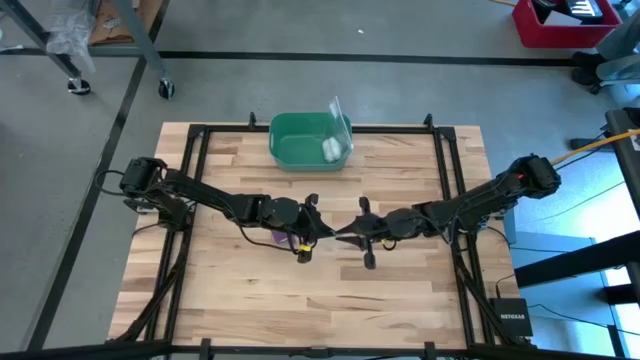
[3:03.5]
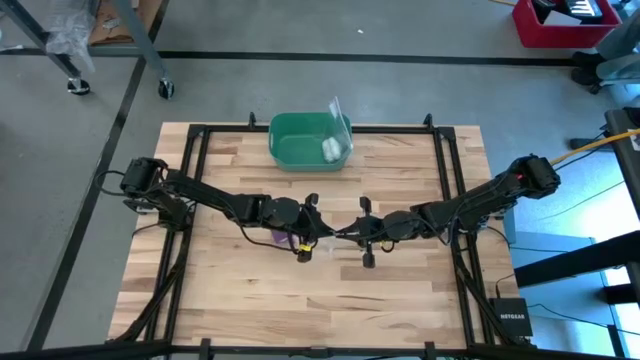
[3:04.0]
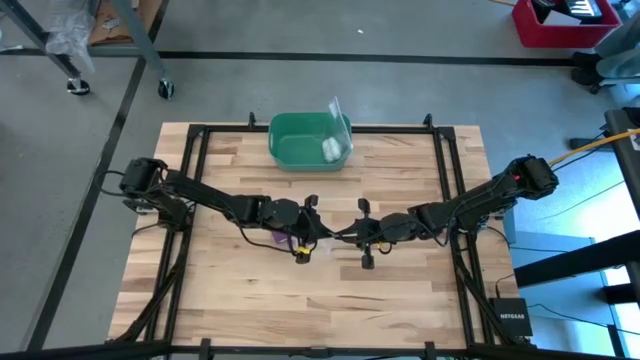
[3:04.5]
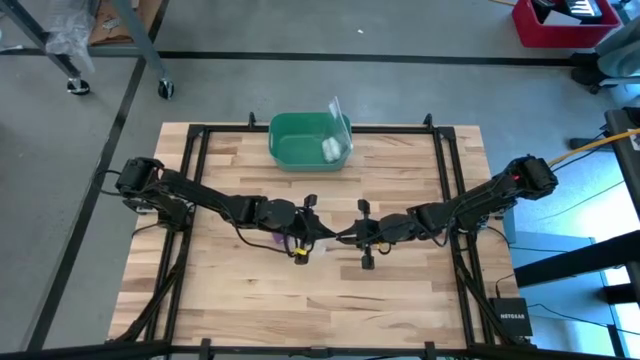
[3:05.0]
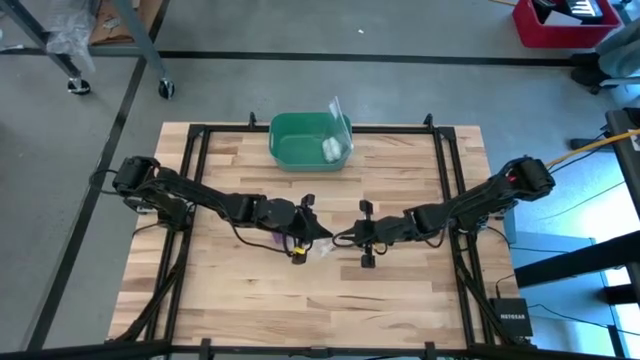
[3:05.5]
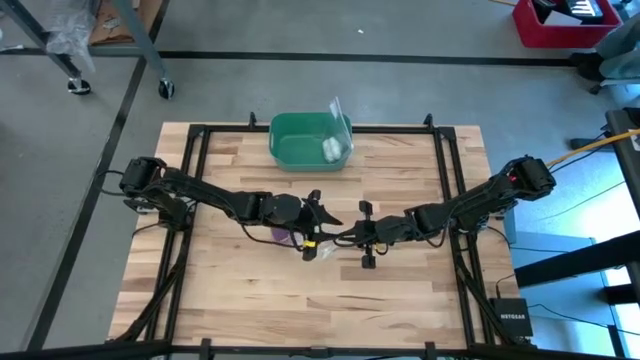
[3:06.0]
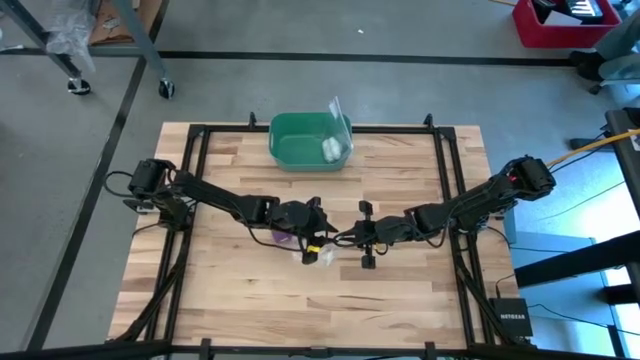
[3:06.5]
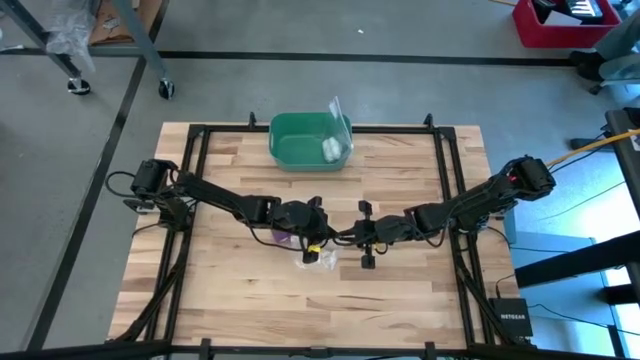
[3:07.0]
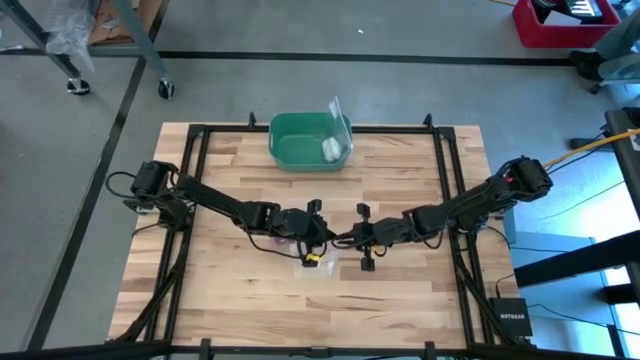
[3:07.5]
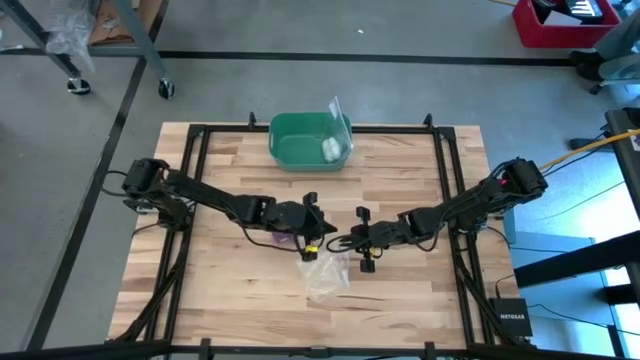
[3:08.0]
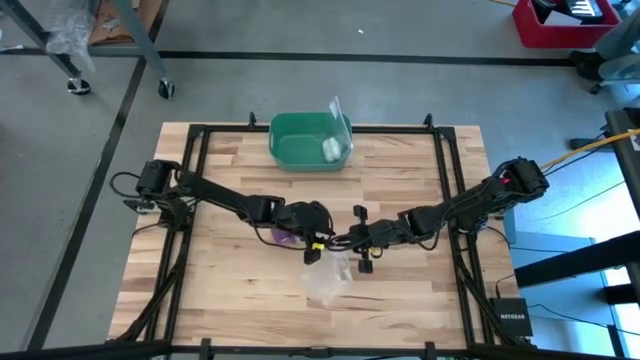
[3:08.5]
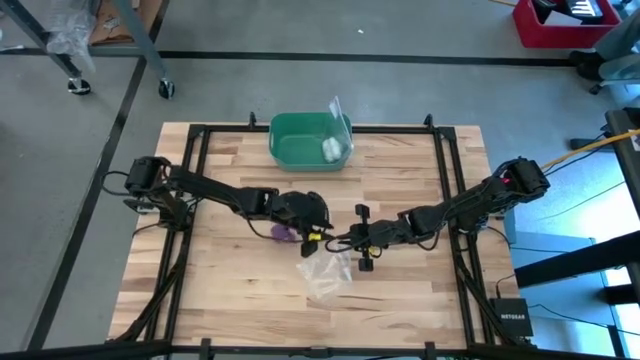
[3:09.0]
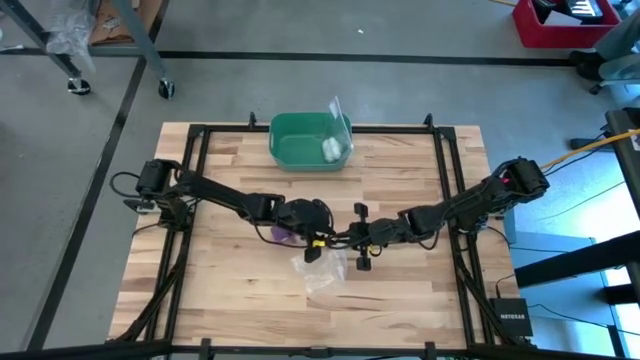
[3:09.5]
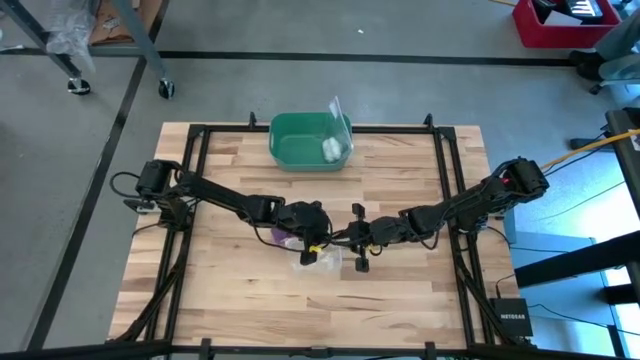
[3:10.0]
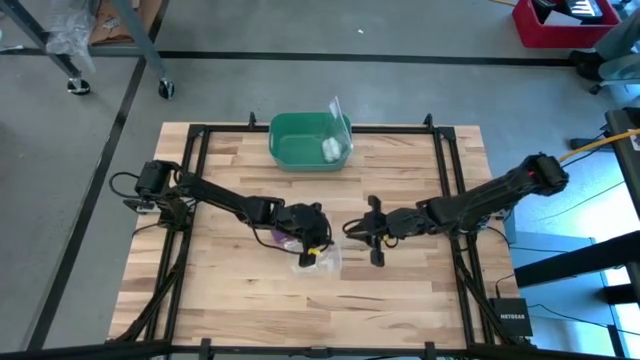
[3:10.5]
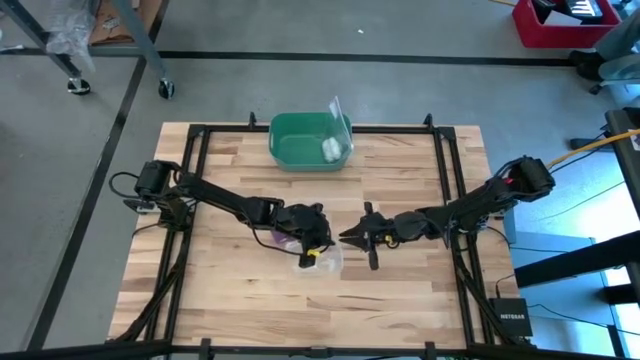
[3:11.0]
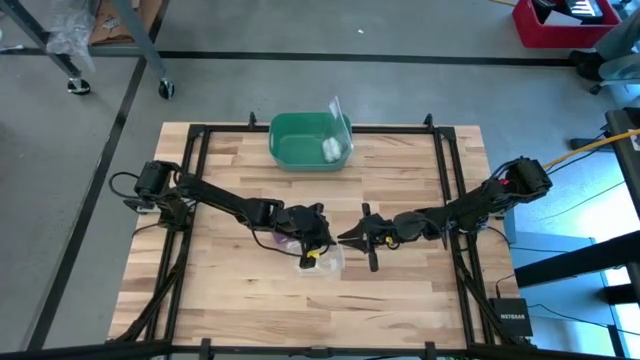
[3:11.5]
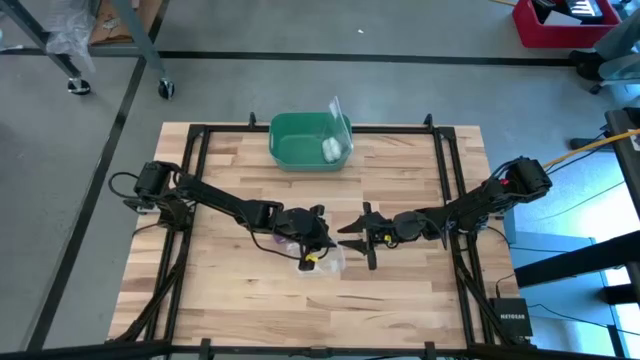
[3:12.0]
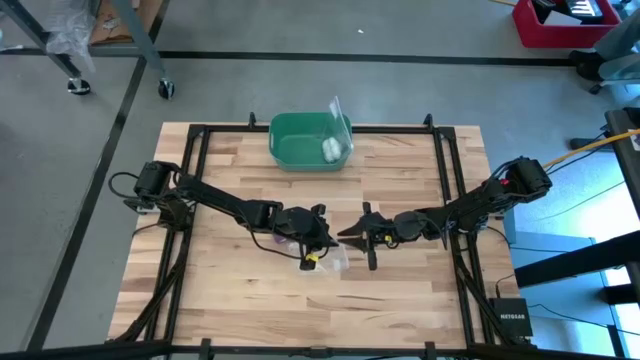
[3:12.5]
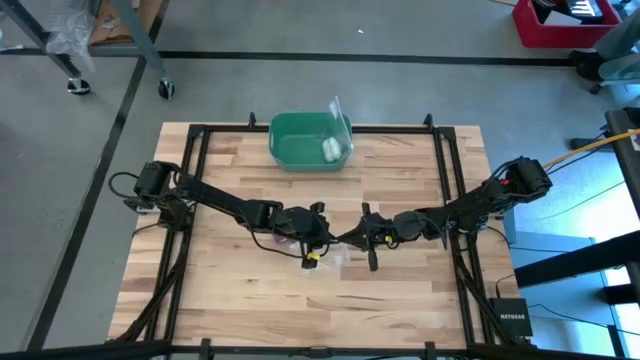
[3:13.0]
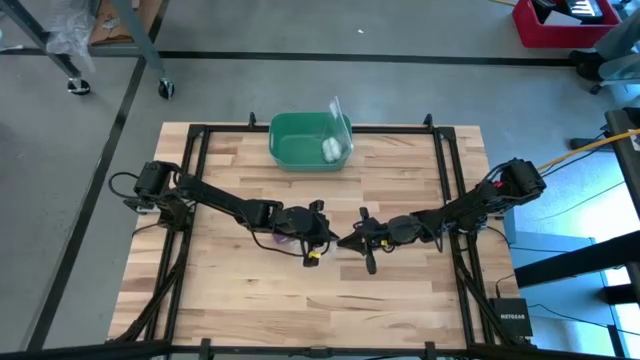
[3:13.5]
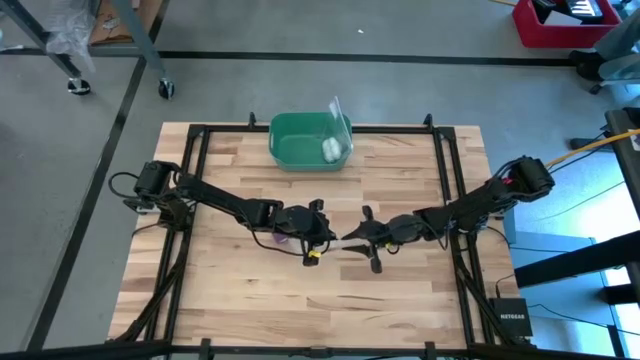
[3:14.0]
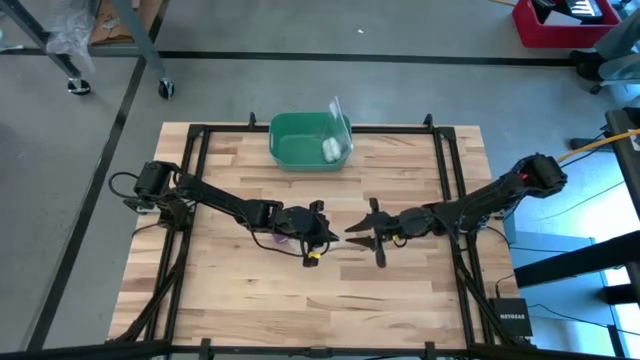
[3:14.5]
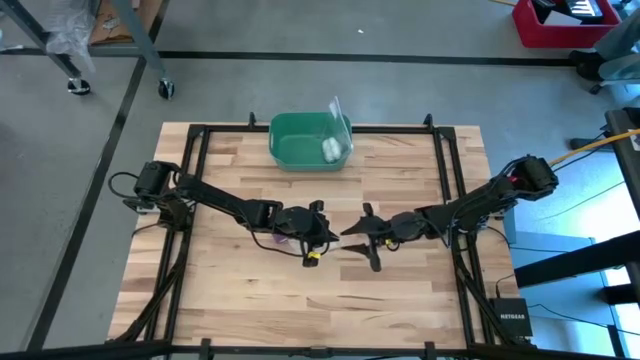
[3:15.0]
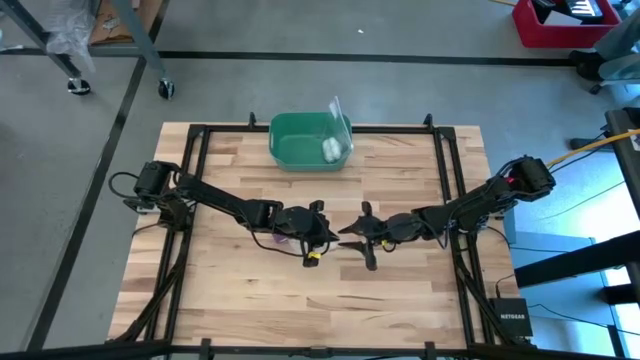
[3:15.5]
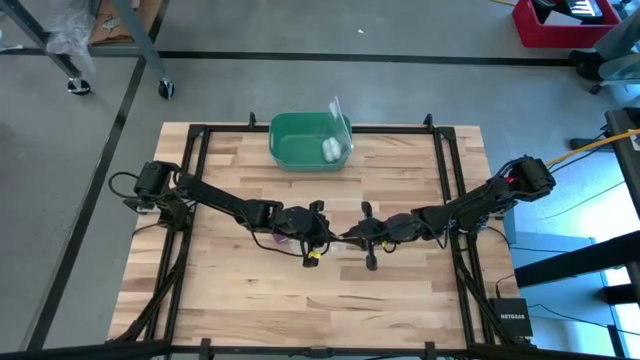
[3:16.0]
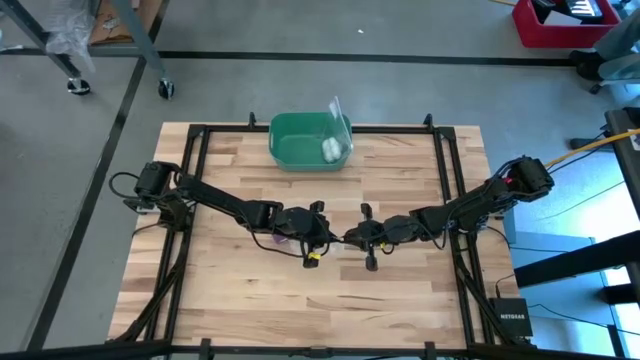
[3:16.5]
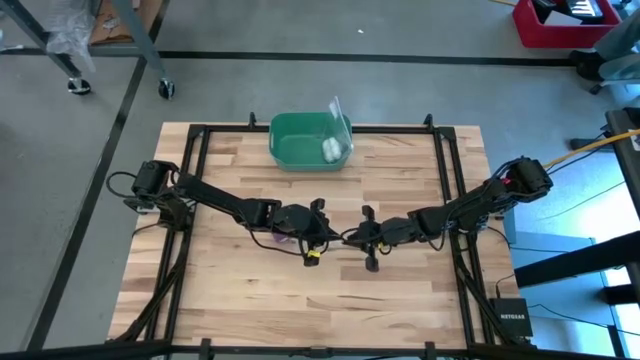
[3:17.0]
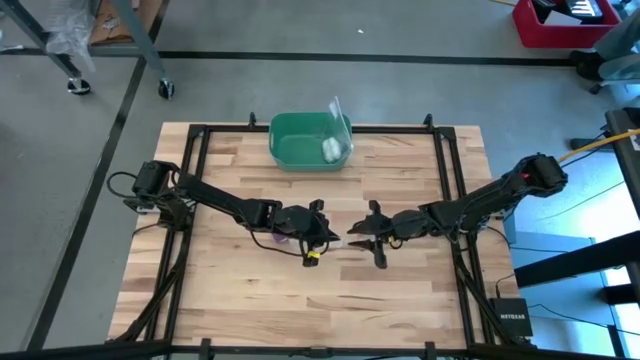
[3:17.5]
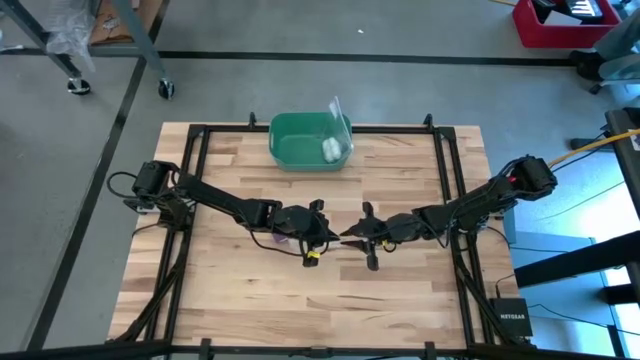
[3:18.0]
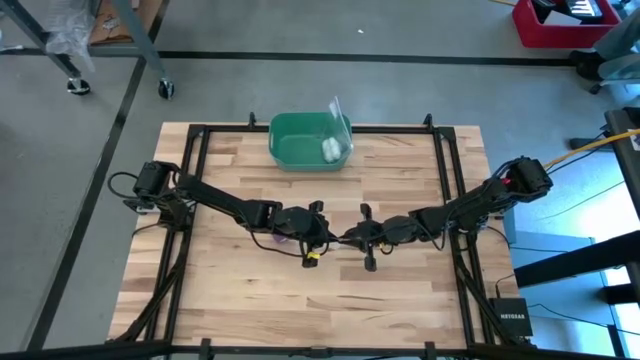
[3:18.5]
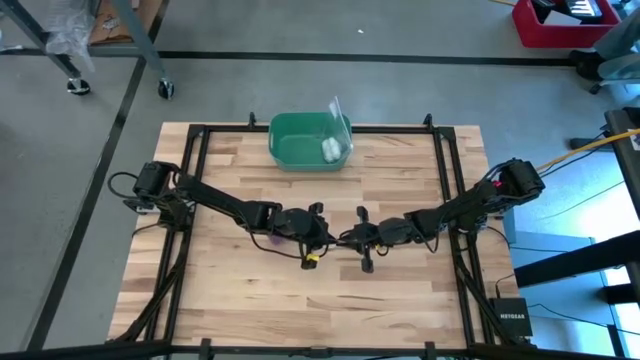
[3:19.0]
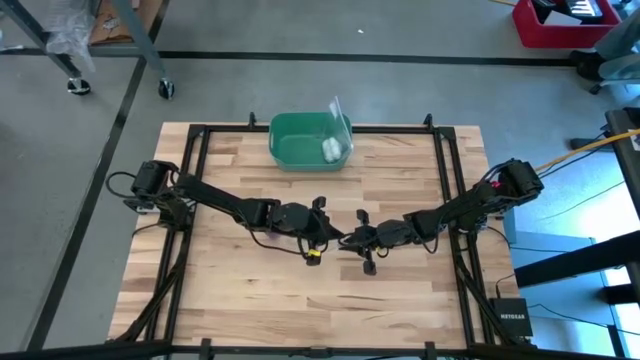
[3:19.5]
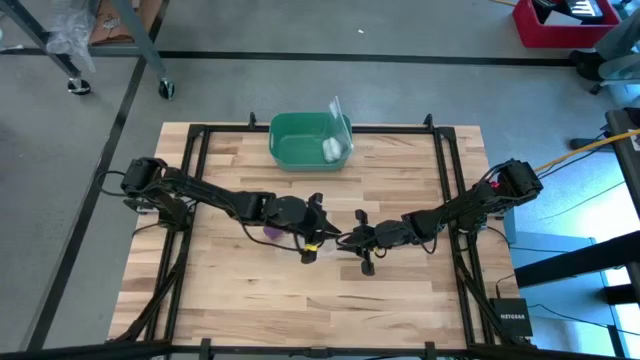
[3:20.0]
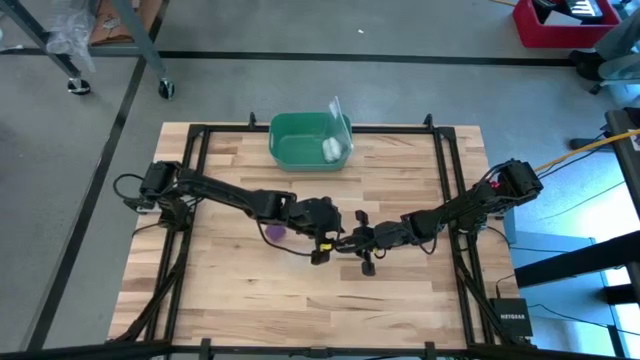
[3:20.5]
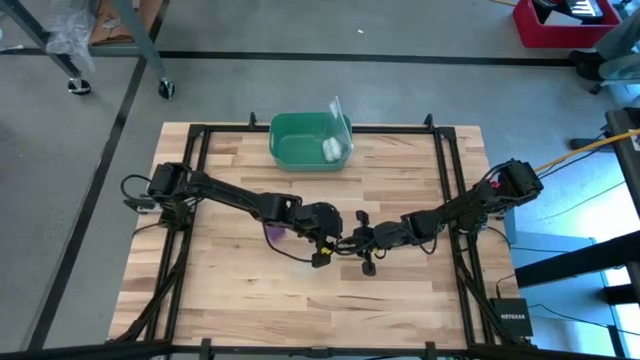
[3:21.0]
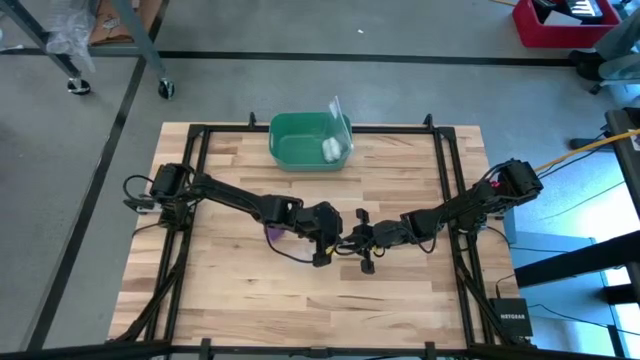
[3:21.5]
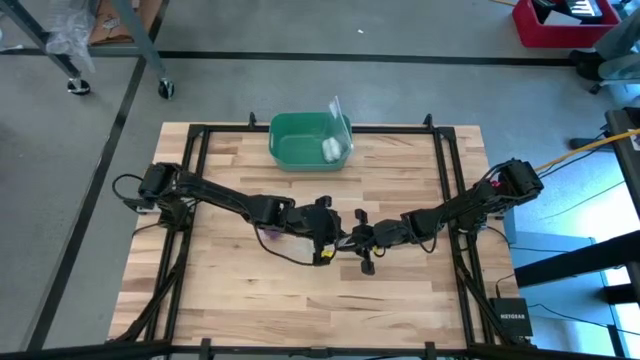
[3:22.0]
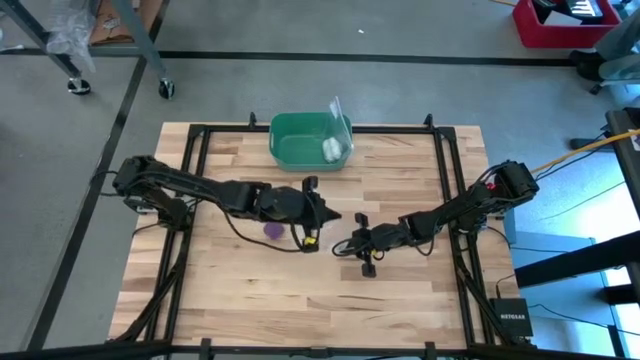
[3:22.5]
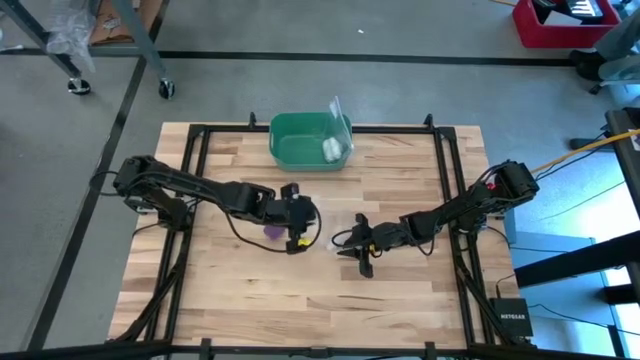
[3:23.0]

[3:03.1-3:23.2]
Task: Roll bandage
Open the zip bag
